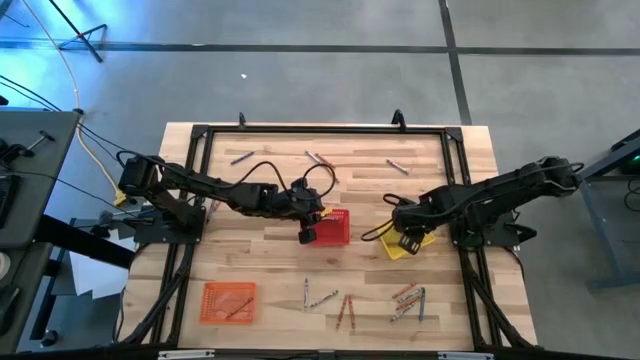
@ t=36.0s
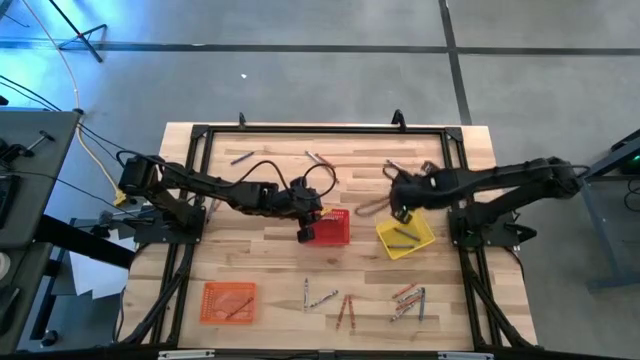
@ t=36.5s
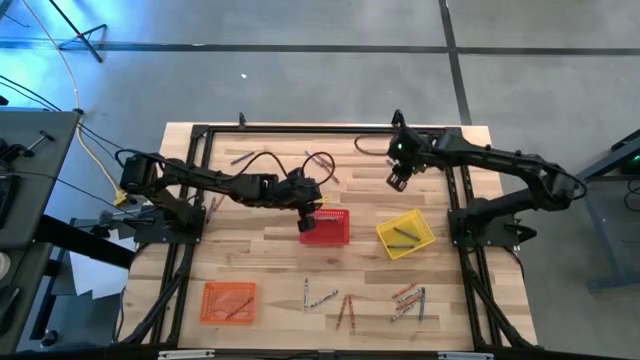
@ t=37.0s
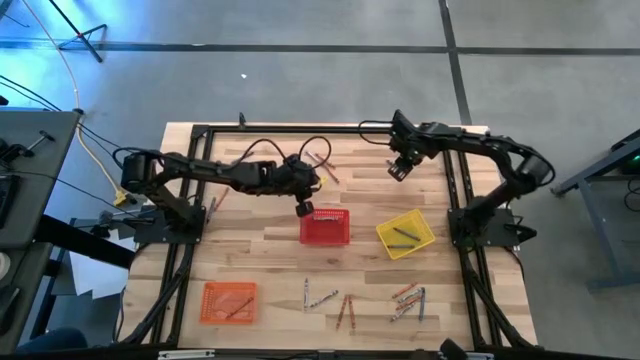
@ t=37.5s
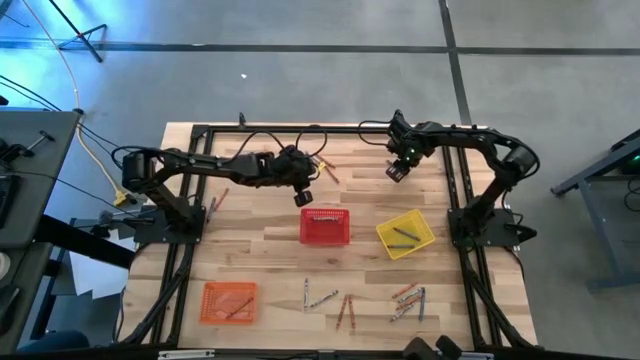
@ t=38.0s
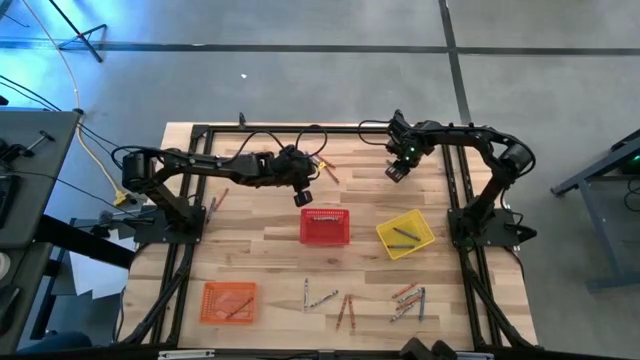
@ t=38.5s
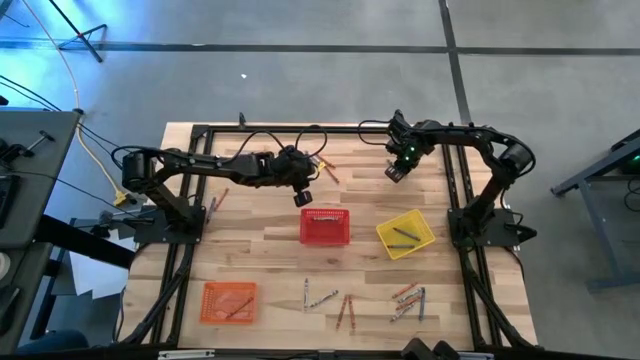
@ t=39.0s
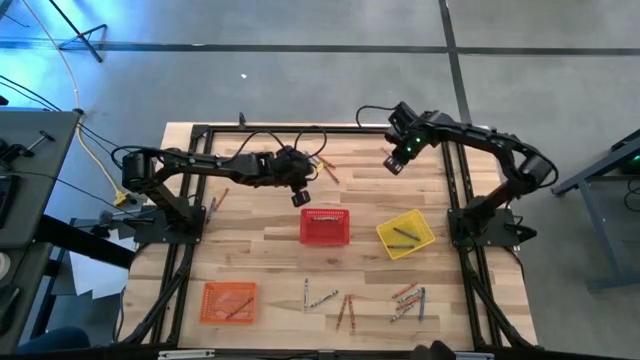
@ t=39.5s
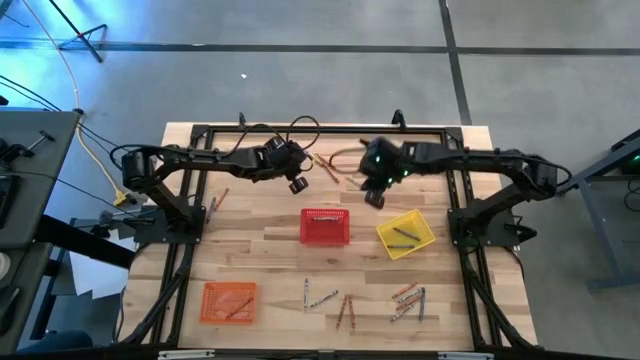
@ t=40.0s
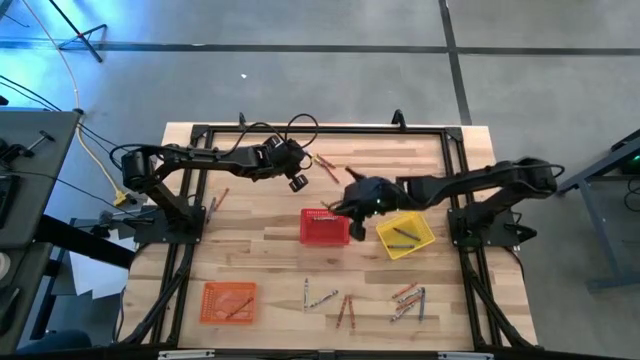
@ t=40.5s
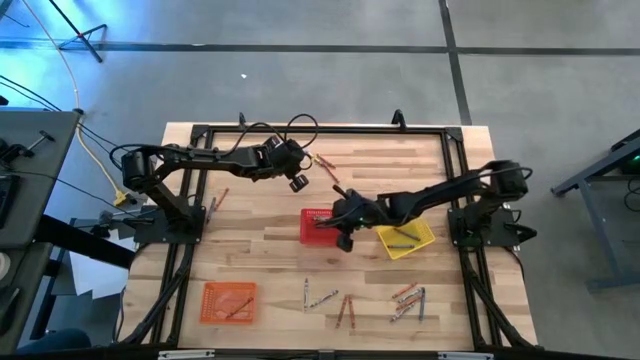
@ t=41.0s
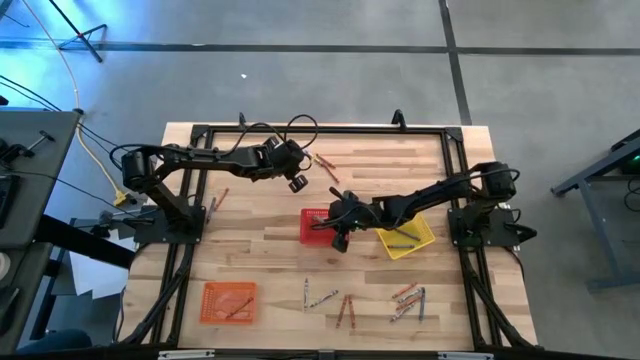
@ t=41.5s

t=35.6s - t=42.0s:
Task: Sort crayons
Put the gray crayon into the red bin

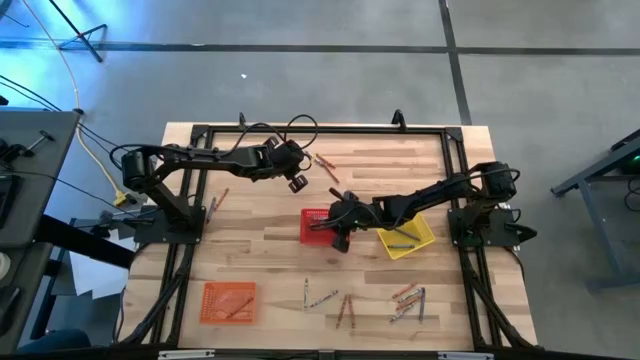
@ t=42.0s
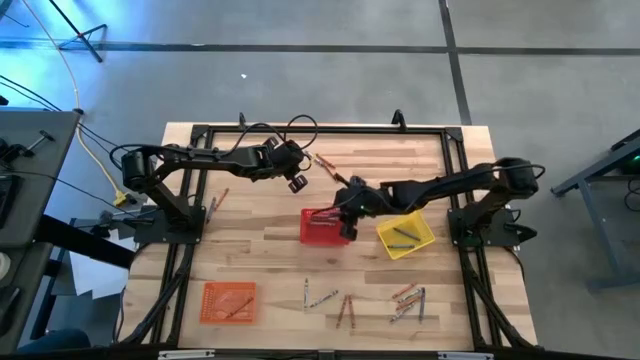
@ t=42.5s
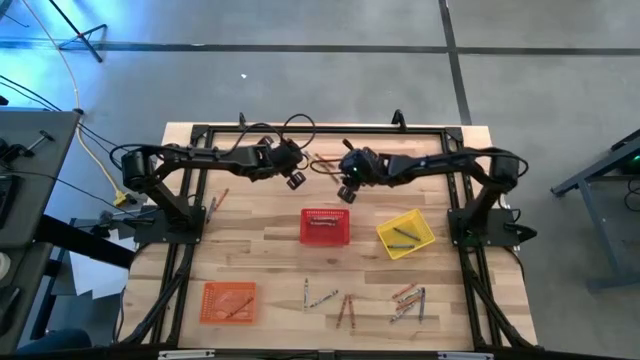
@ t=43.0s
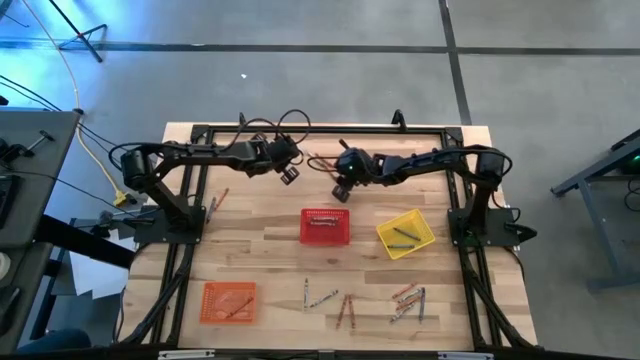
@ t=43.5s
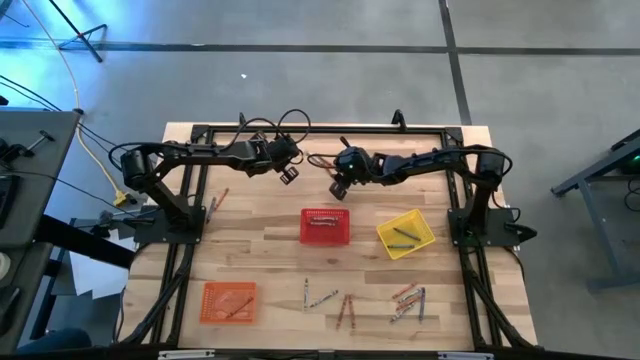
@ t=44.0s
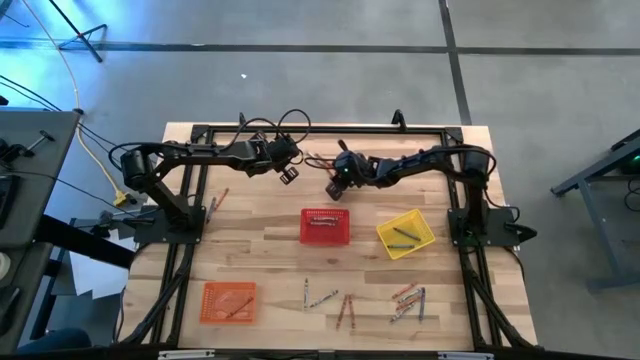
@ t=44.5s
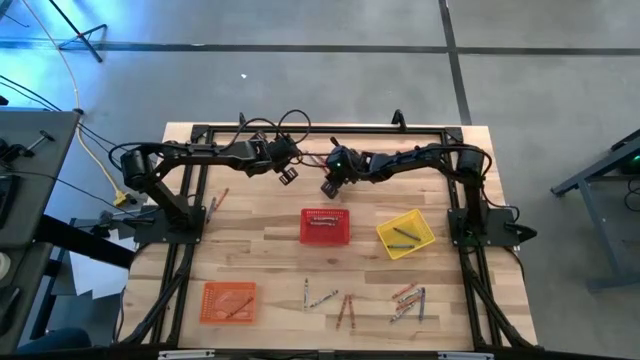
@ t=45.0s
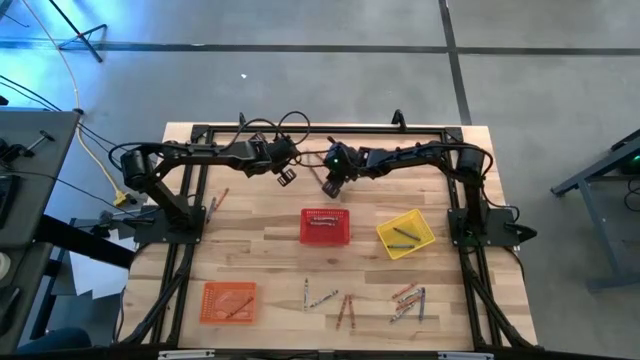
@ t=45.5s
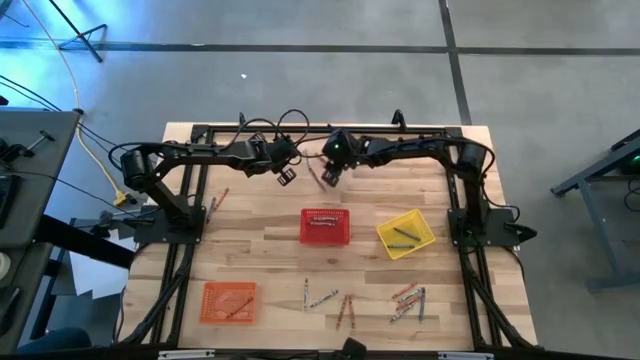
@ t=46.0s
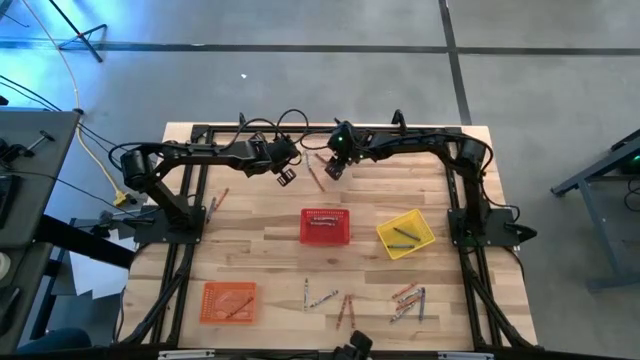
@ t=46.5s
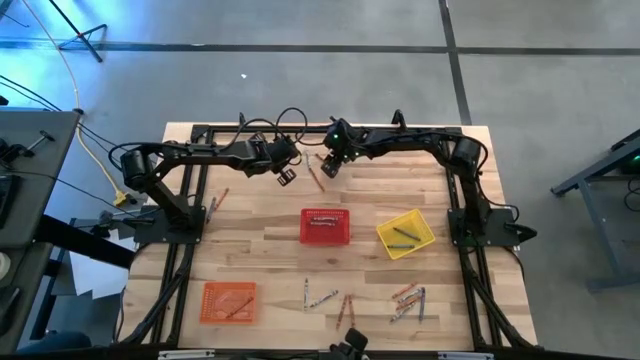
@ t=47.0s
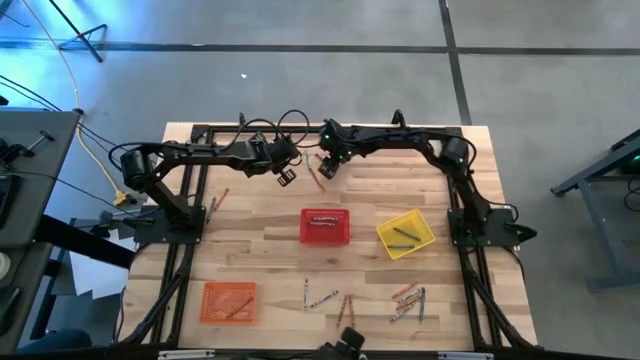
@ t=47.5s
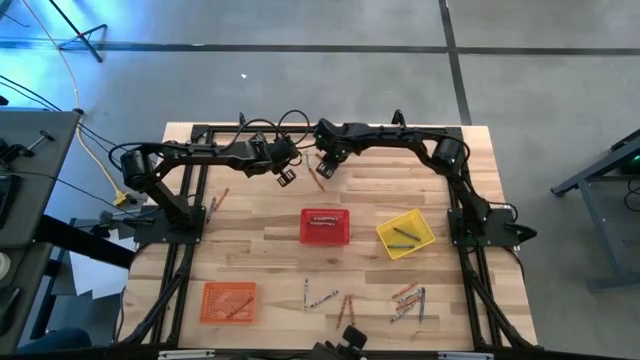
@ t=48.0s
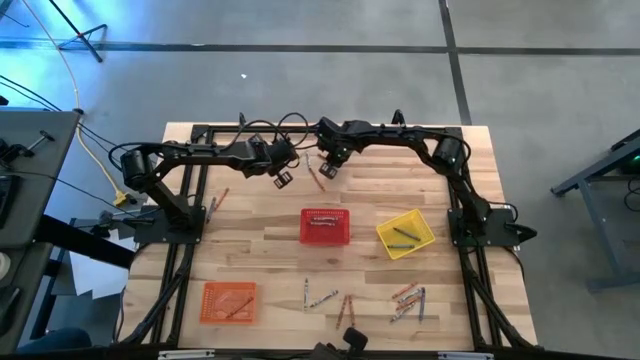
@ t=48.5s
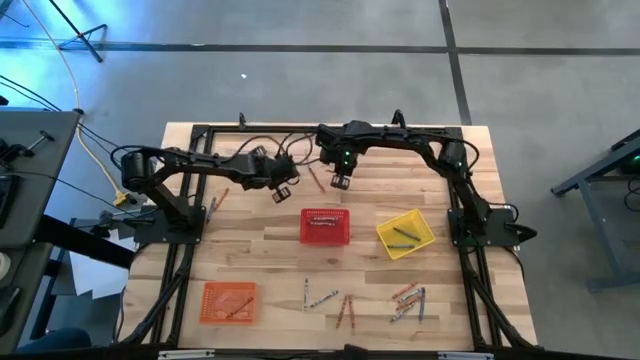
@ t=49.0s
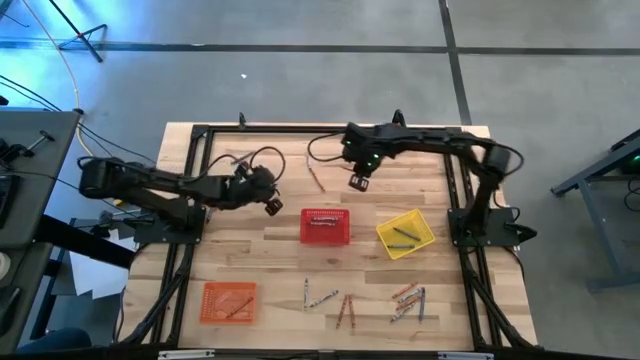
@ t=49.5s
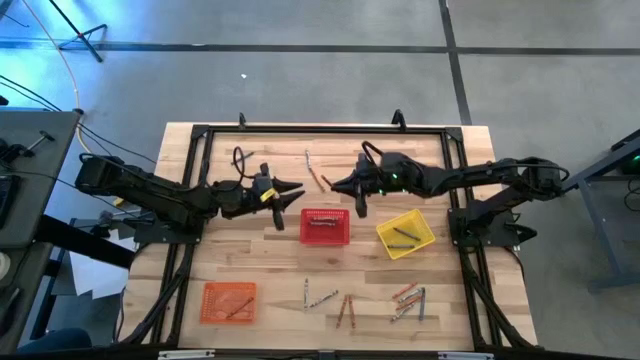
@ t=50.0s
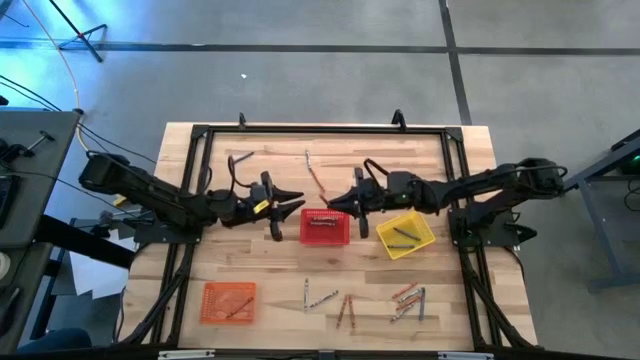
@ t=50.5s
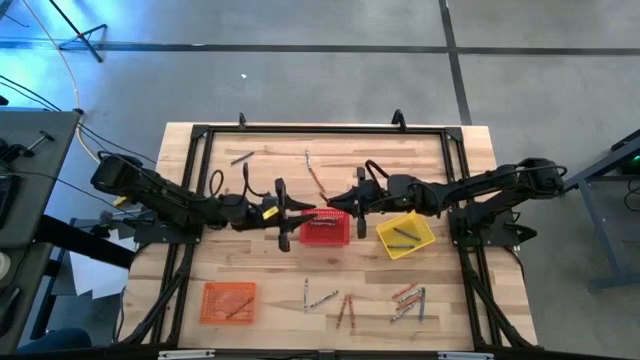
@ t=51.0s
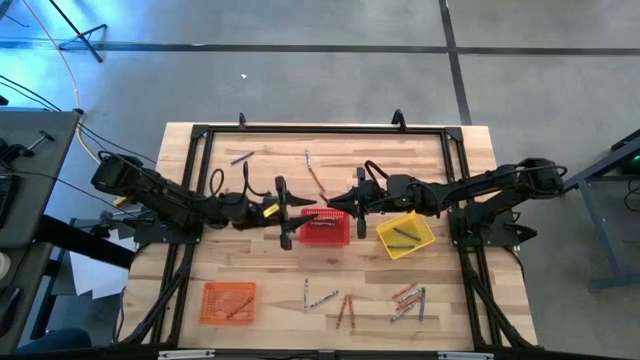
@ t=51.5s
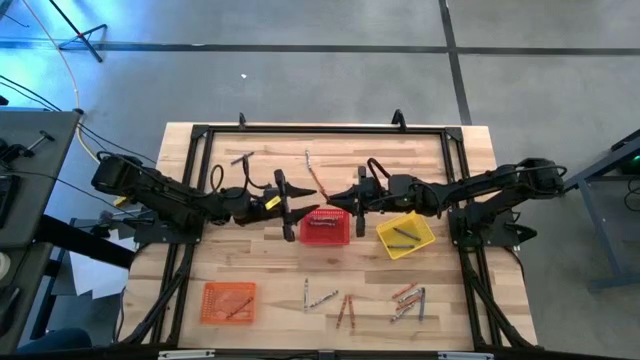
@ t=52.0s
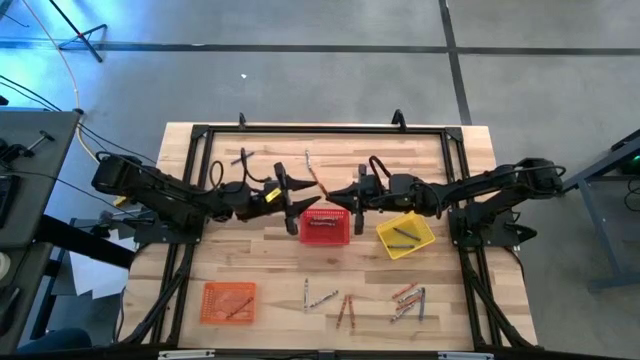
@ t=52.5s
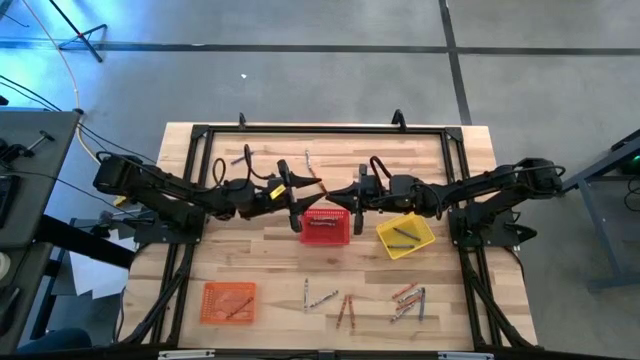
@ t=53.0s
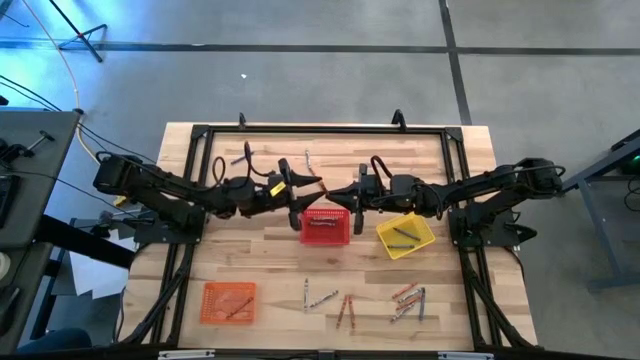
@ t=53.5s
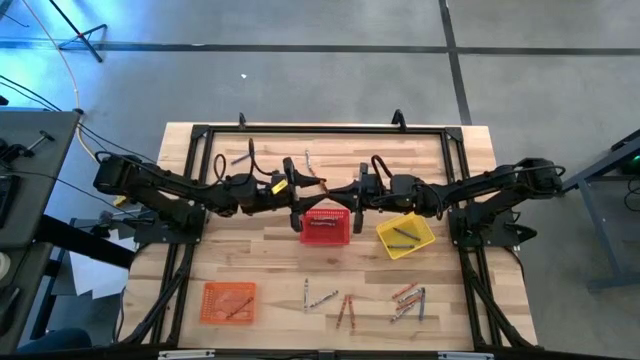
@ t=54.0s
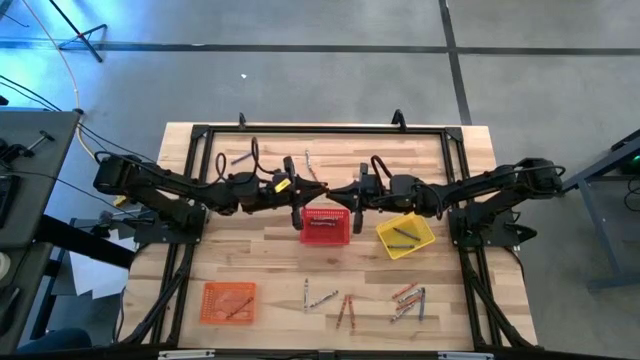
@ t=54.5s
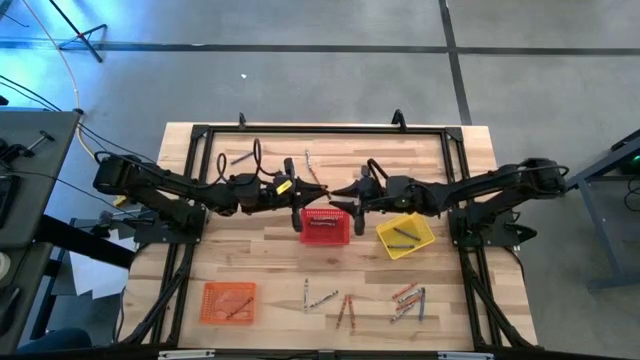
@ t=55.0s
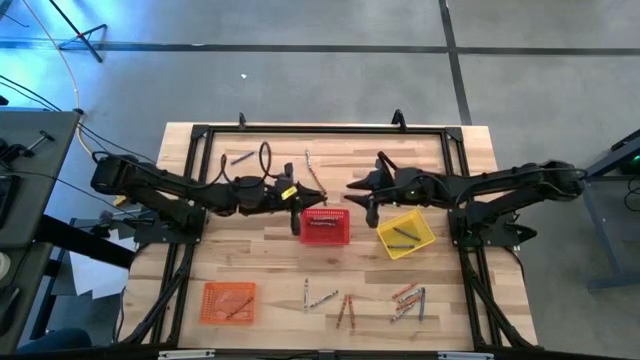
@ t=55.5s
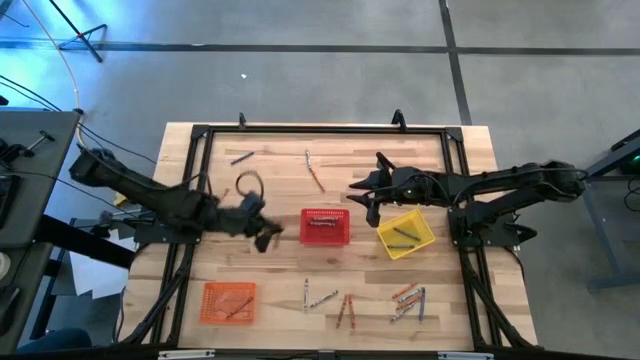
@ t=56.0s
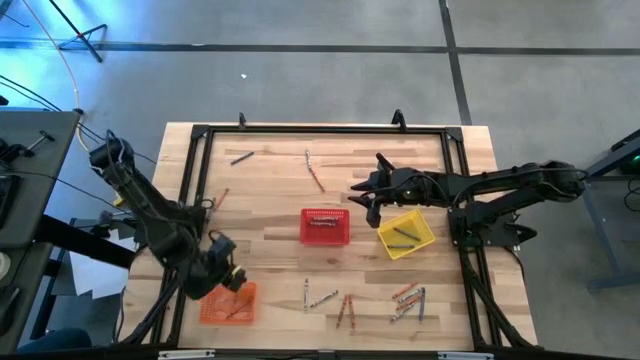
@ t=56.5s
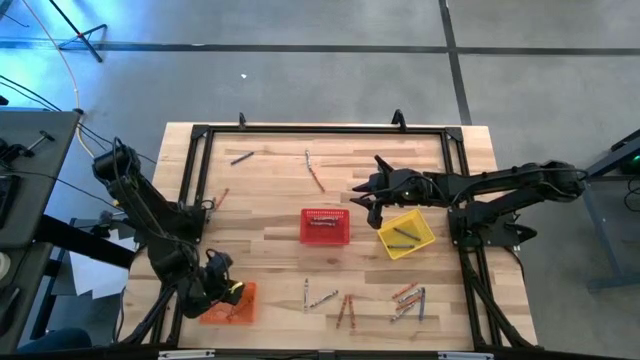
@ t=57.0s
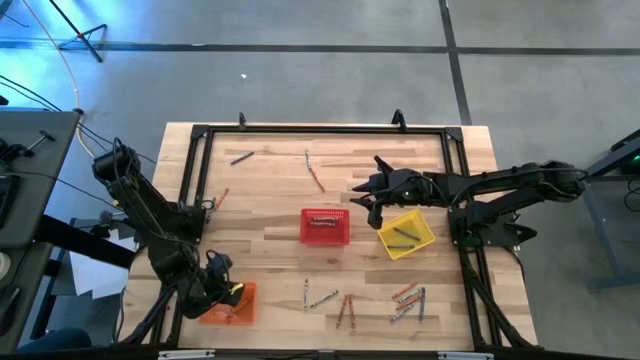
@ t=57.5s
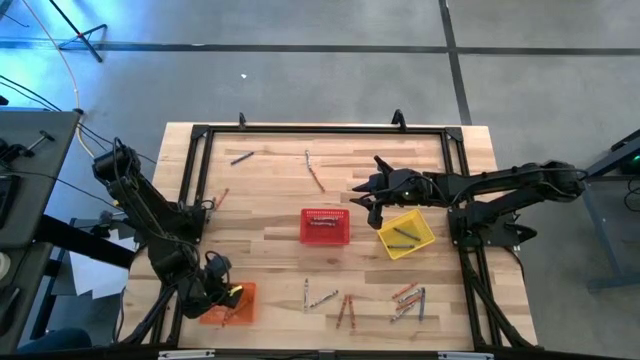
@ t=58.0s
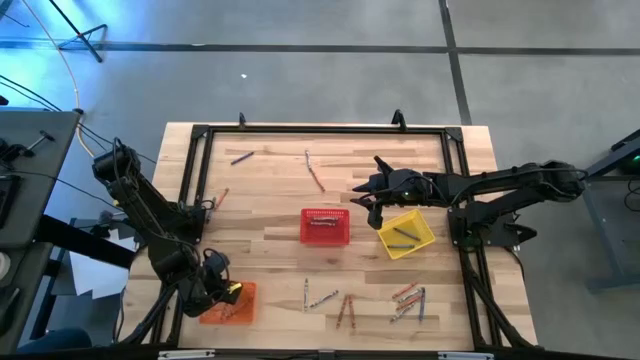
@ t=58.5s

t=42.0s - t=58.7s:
Put the orange crayon into the orange bin
